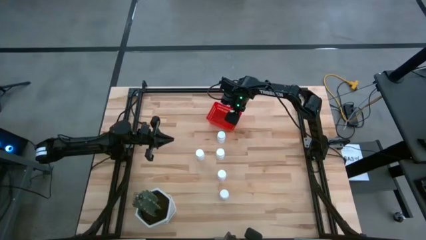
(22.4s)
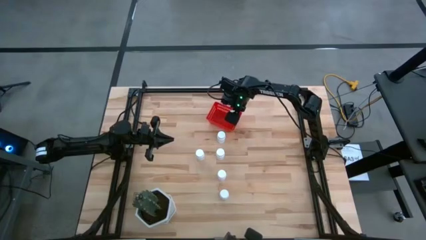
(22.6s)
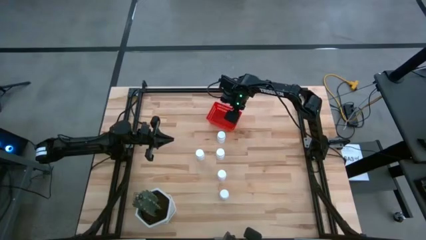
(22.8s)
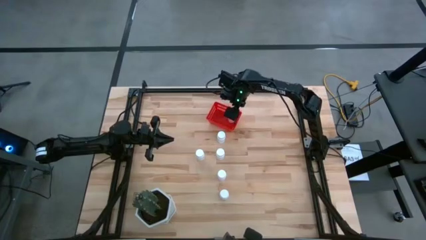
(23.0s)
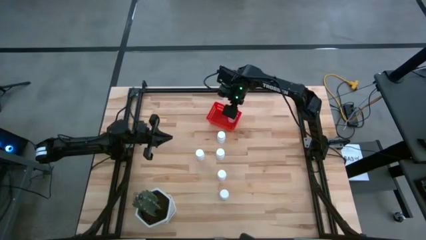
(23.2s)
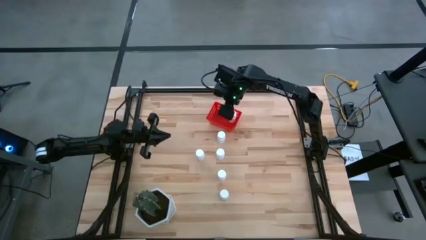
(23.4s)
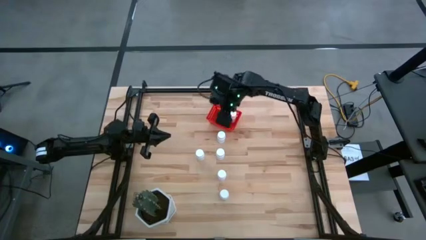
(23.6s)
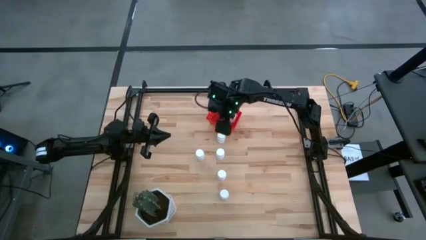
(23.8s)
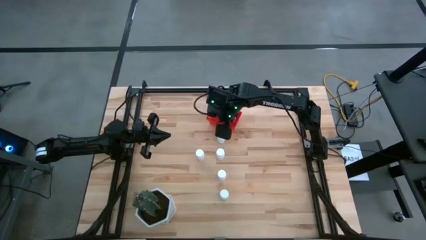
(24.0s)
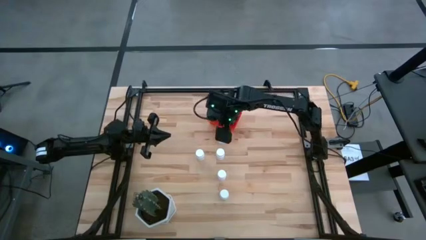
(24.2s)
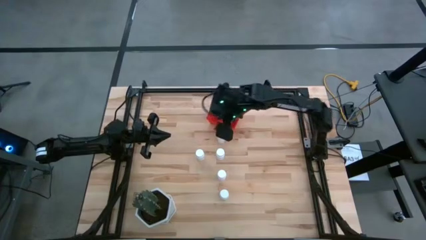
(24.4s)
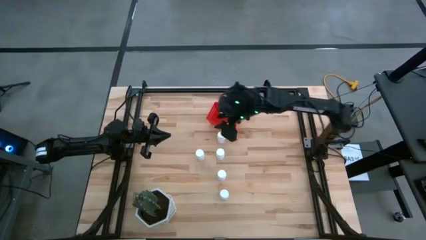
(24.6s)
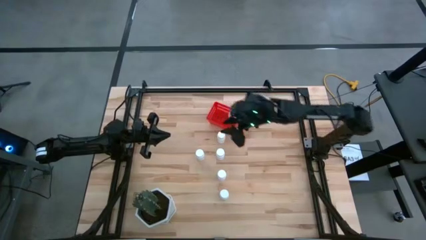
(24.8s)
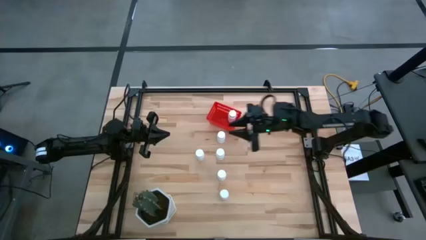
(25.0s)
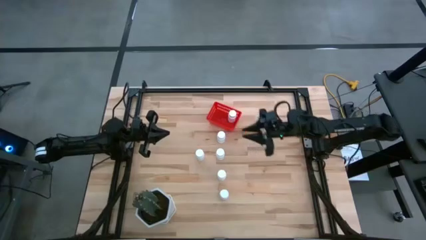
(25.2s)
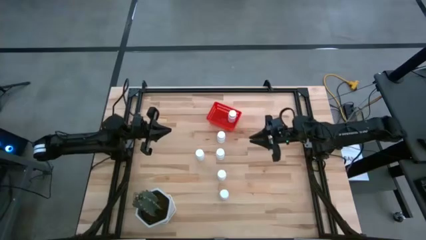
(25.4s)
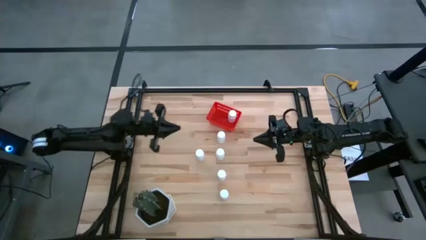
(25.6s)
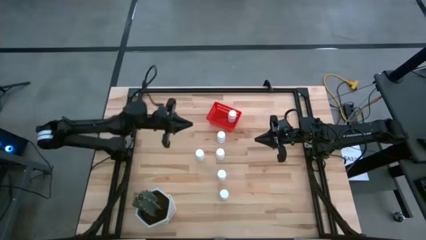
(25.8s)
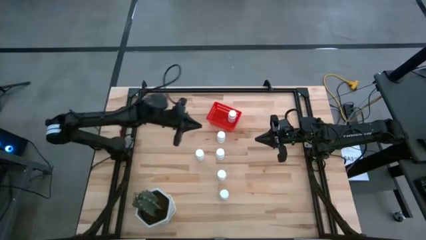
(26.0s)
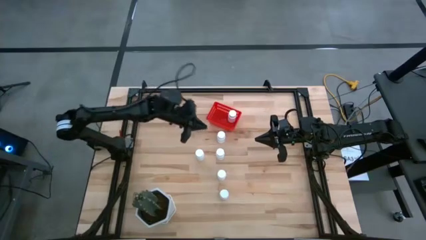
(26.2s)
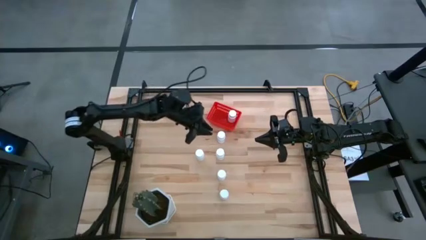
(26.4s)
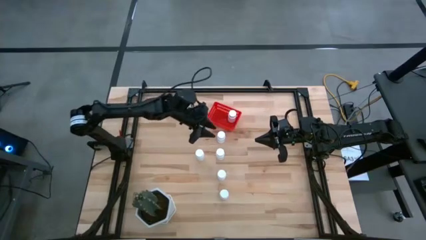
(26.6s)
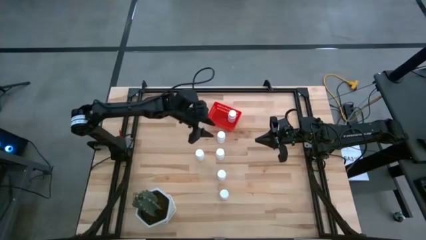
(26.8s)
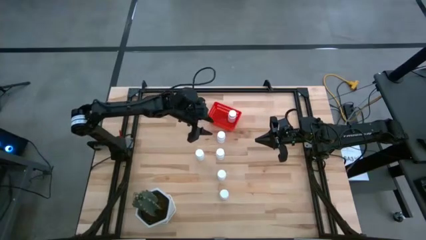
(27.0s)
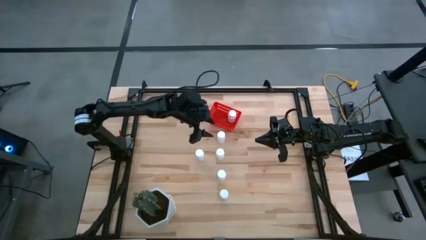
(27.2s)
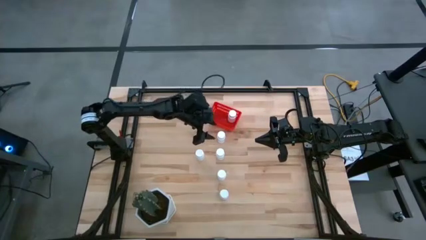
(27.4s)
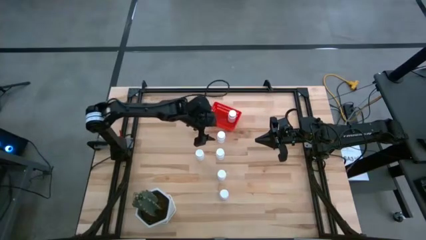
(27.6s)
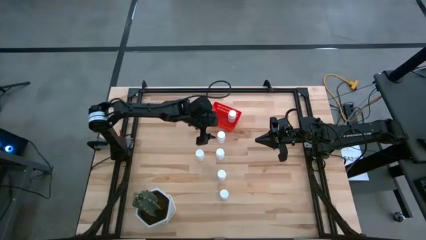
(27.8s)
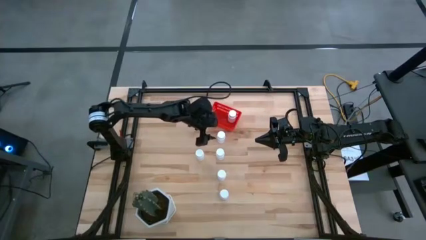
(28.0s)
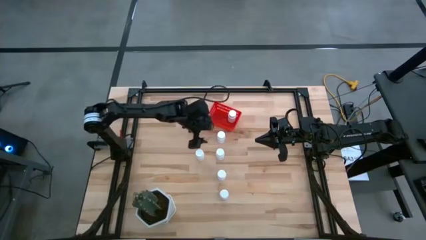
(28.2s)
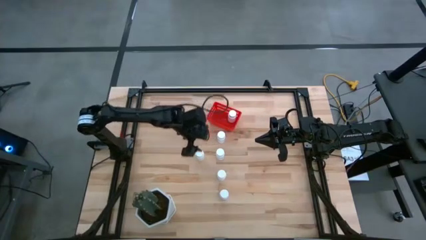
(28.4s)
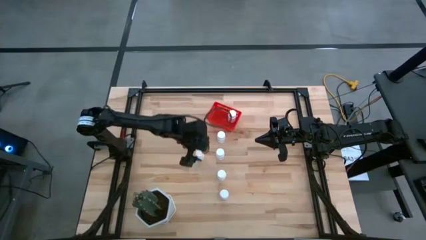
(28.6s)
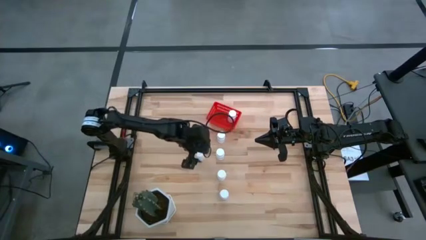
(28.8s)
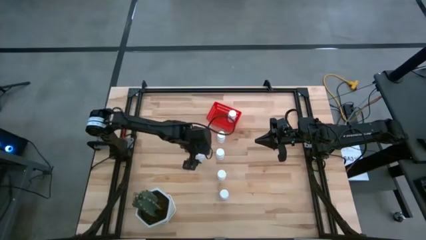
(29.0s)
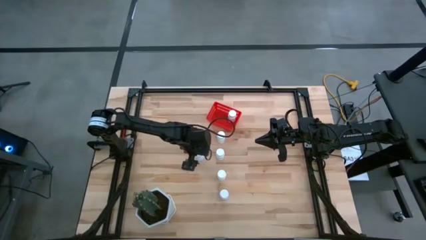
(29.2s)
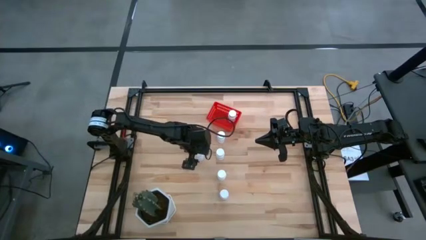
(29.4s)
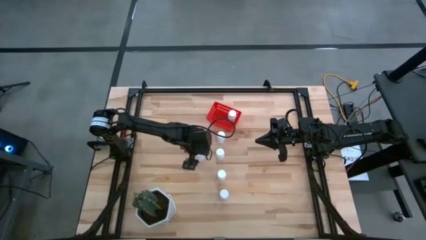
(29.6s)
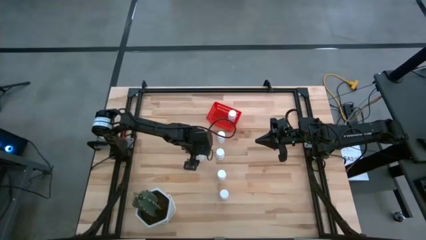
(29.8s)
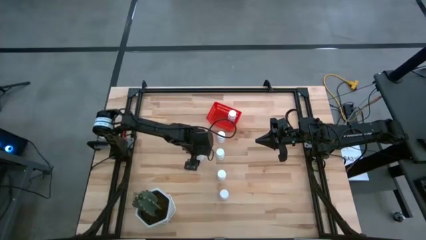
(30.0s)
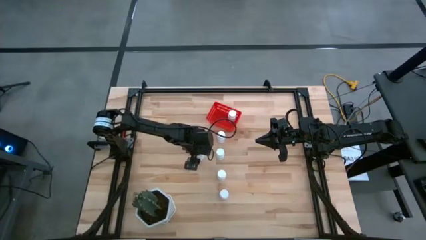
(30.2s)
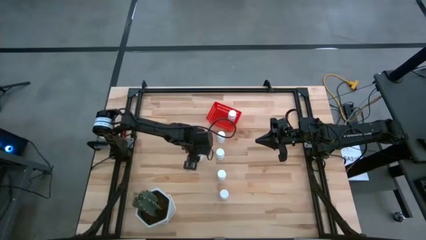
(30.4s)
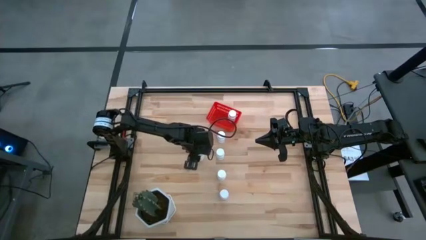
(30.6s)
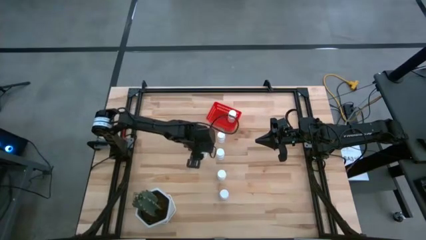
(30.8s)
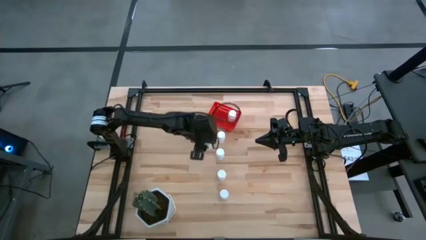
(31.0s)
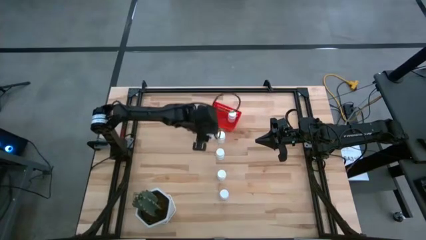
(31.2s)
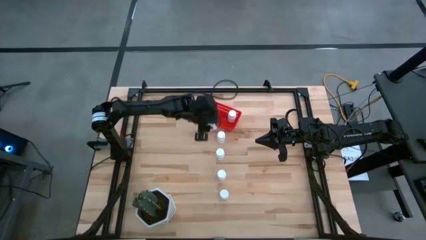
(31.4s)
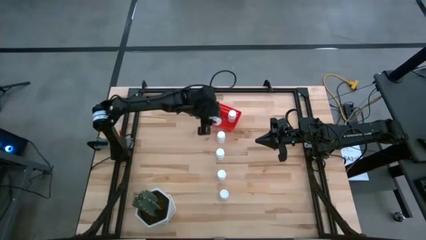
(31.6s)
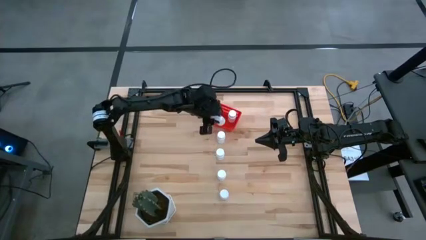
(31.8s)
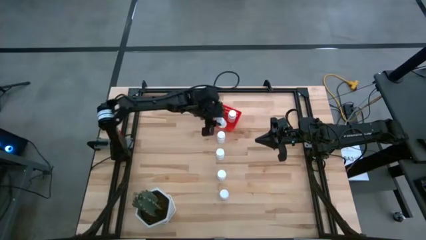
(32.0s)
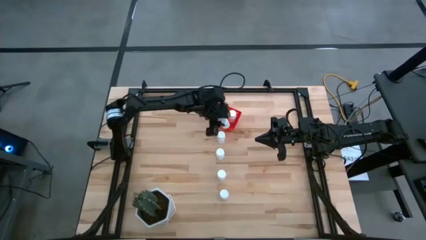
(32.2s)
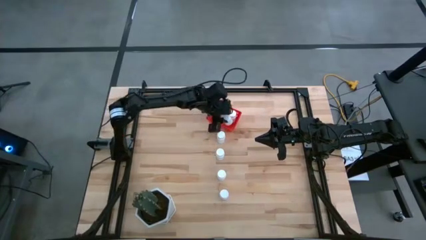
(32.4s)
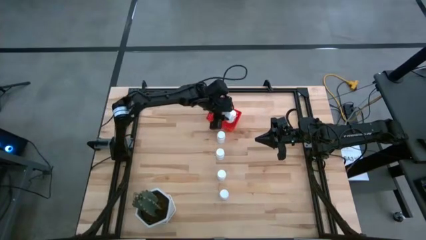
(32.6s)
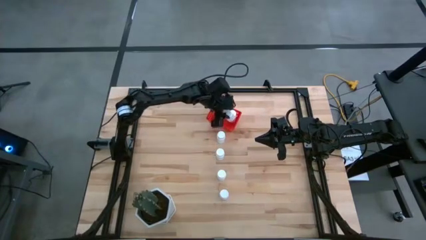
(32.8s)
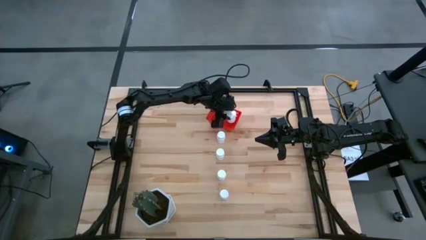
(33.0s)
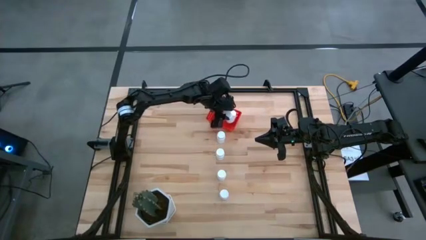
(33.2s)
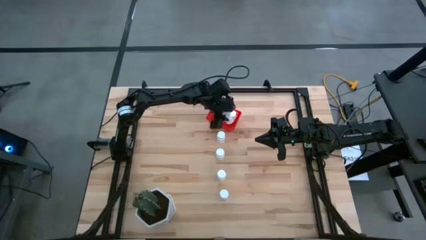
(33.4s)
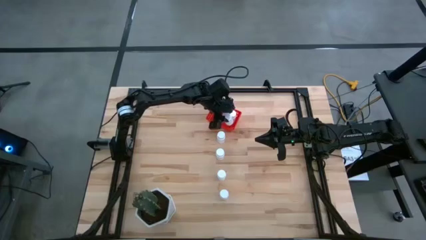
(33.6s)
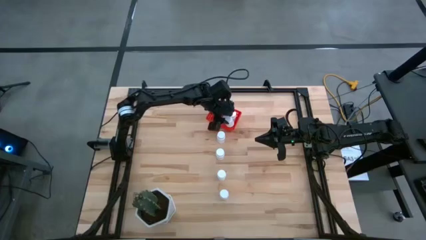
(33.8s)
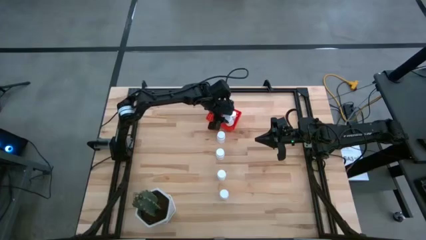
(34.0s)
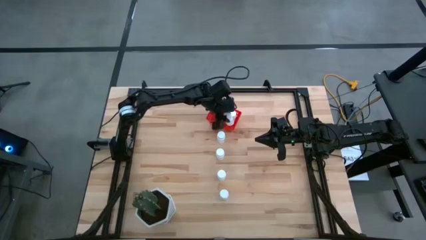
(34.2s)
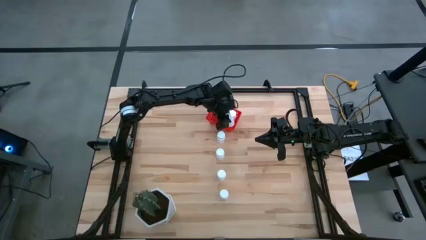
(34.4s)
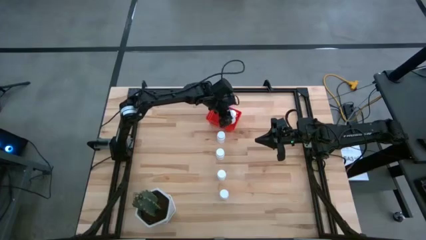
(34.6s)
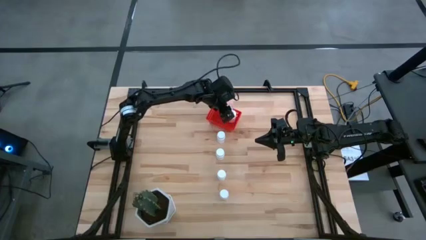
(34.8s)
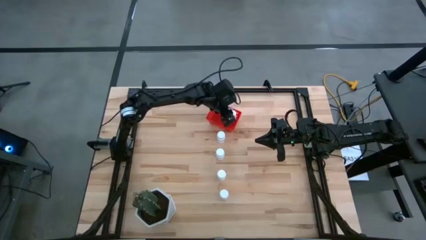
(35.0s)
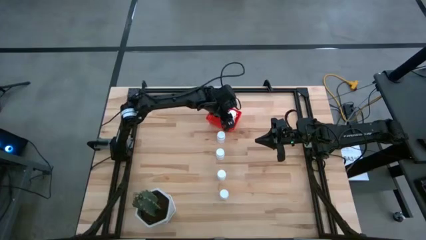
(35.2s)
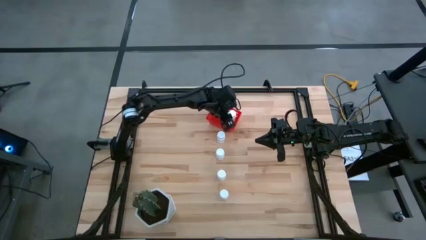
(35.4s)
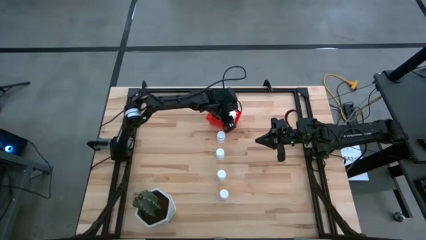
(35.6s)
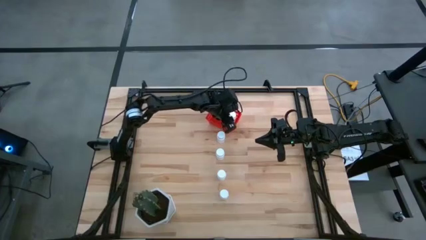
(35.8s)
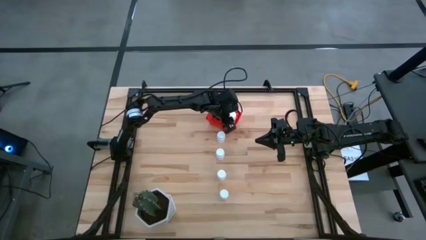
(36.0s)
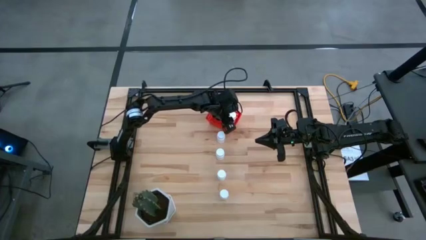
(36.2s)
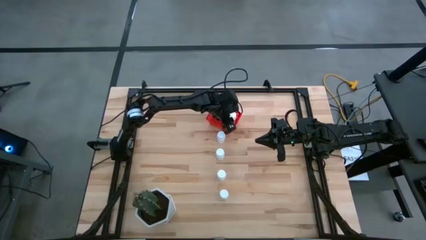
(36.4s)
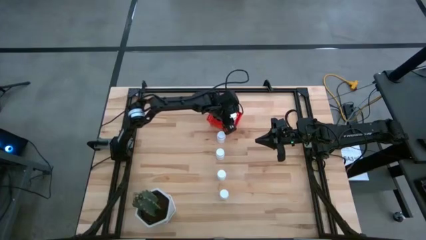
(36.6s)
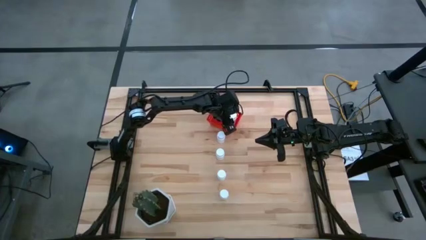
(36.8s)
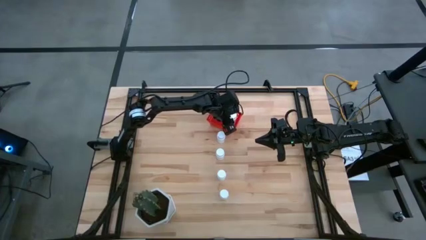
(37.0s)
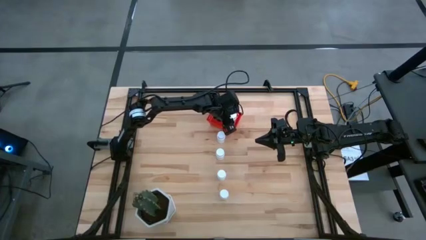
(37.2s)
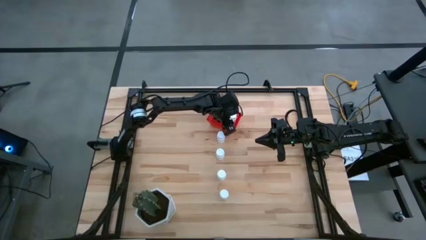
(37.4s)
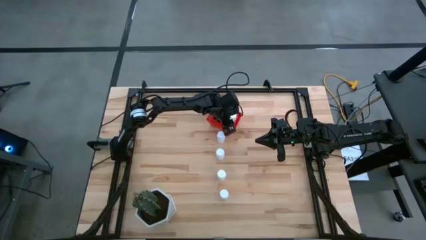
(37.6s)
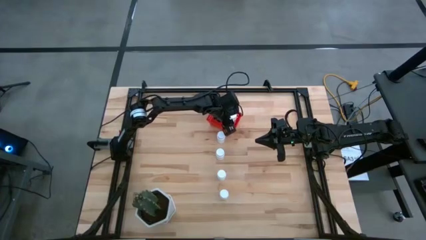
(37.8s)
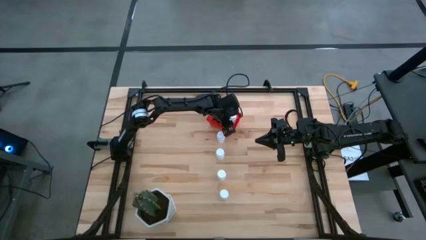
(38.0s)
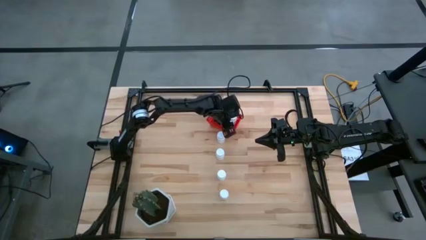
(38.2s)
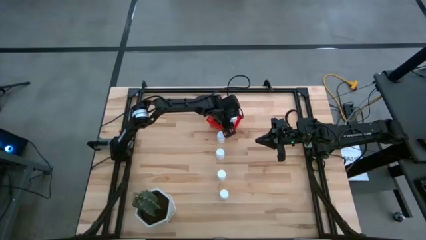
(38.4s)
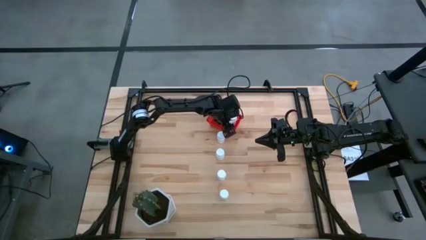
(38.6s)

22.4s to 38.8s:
Task: Pick and place pill bottles into a basket
Put the white pill bottle into the red bin

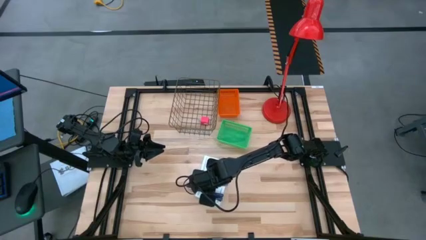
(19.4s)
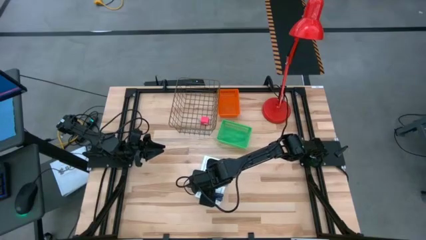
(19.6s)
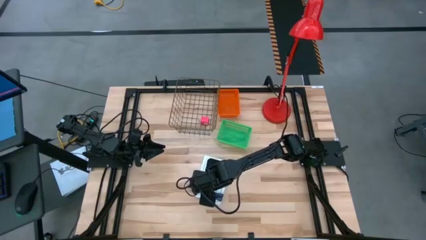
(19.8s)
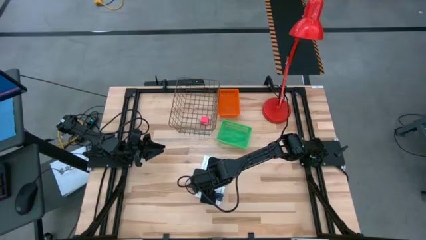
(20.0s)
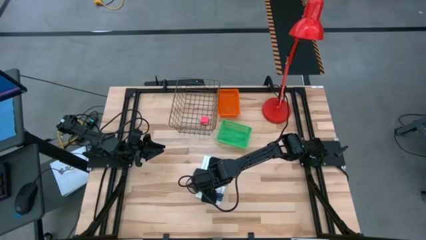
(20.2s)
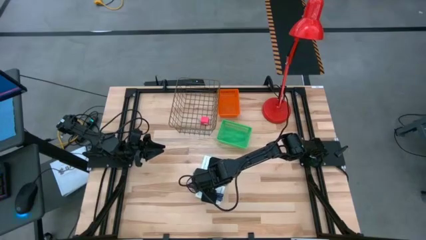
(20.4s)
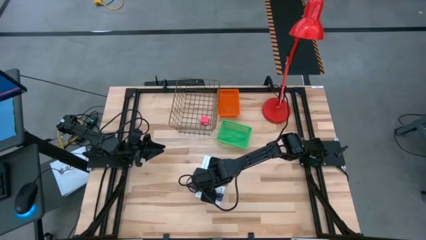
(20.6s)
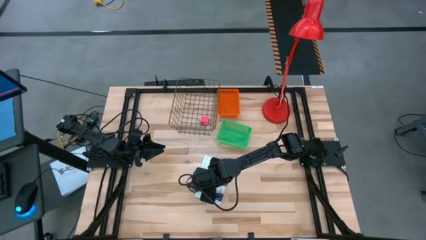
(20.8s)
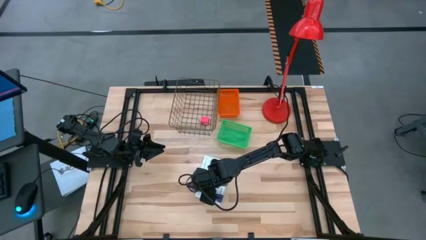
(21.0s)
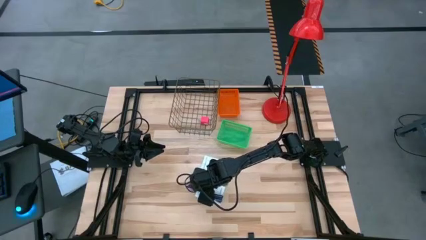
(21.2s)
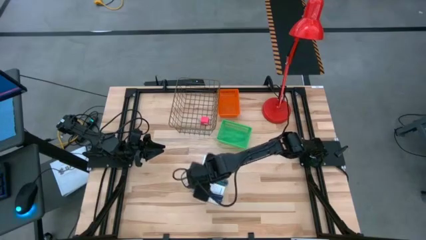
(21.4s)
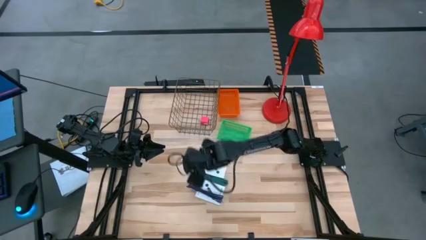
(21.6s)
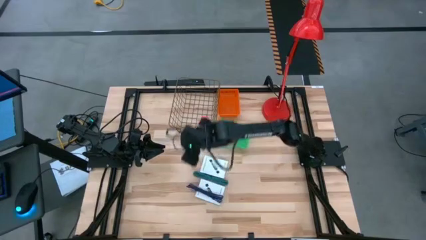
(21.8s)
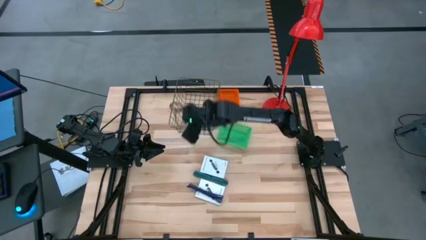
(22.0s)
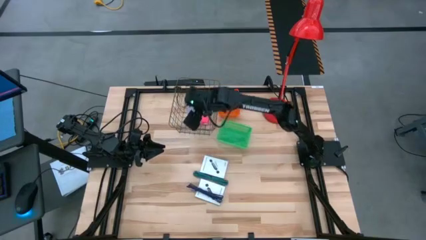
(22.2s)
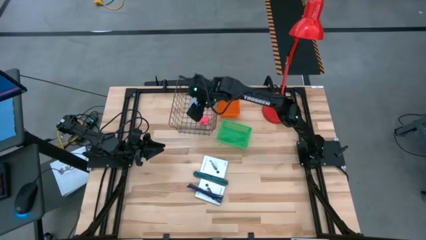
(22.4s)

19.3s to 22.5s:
Task: Pick and place items into bin
Put the white charger adapter into the wire basket
